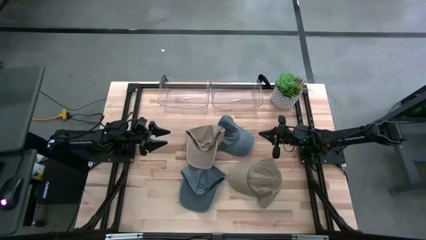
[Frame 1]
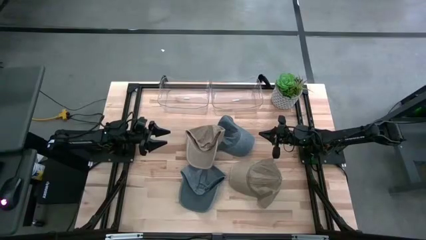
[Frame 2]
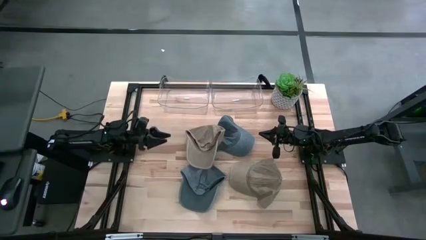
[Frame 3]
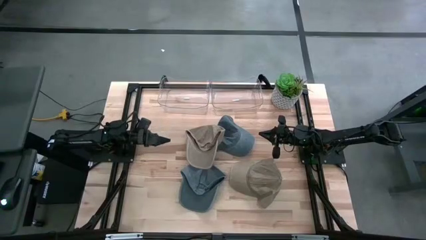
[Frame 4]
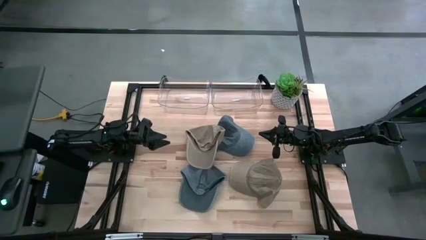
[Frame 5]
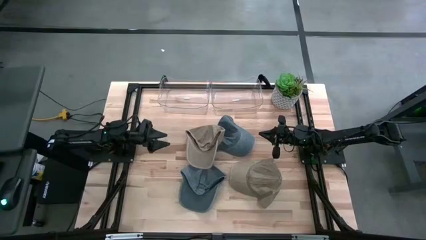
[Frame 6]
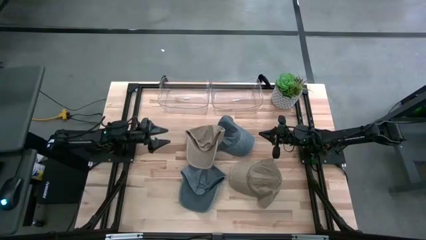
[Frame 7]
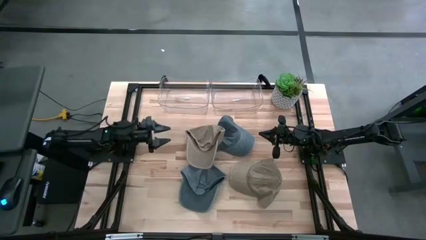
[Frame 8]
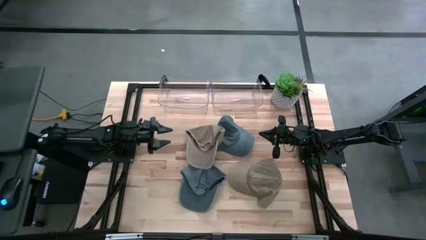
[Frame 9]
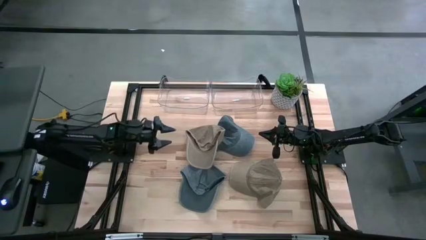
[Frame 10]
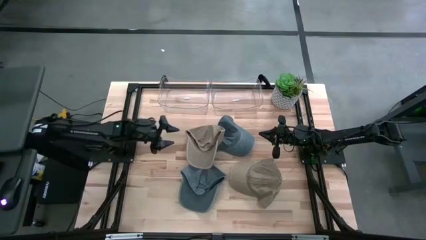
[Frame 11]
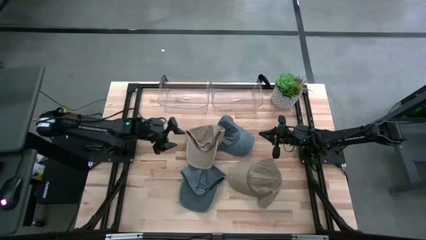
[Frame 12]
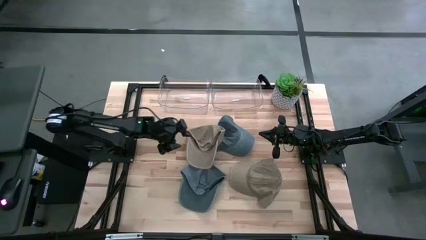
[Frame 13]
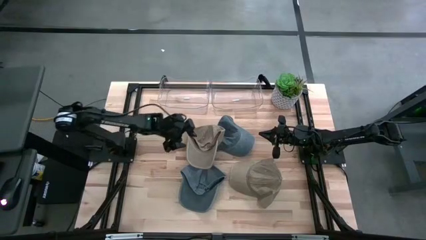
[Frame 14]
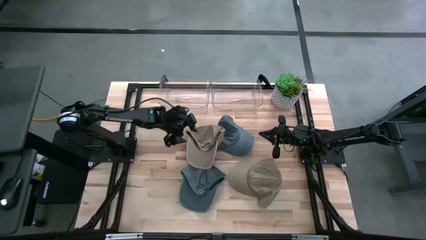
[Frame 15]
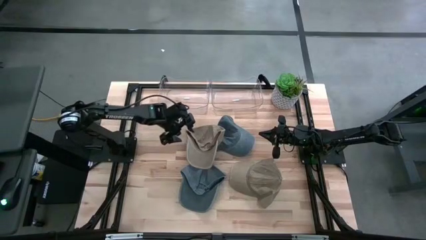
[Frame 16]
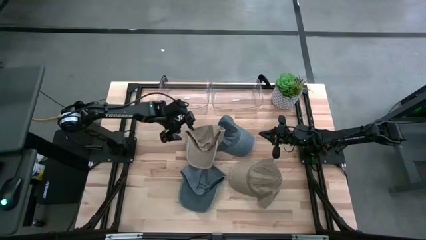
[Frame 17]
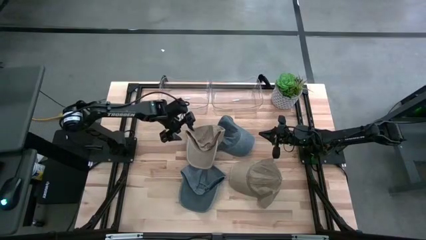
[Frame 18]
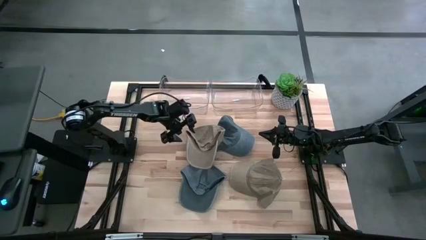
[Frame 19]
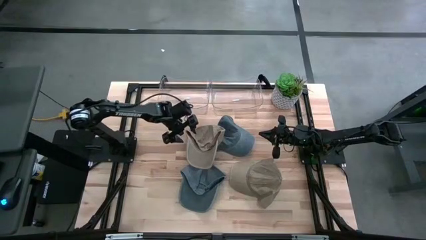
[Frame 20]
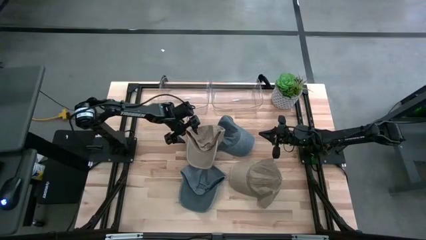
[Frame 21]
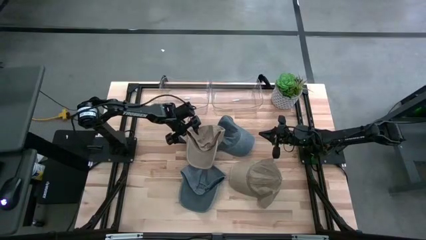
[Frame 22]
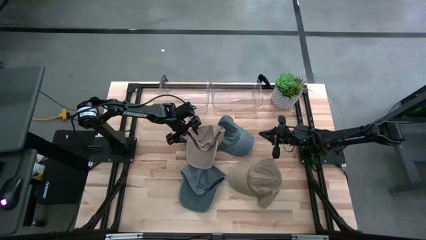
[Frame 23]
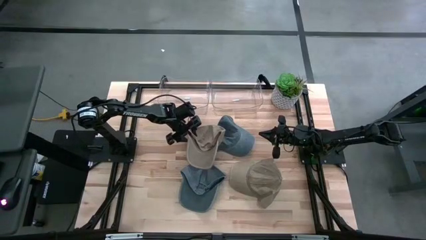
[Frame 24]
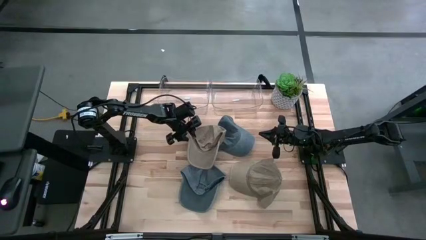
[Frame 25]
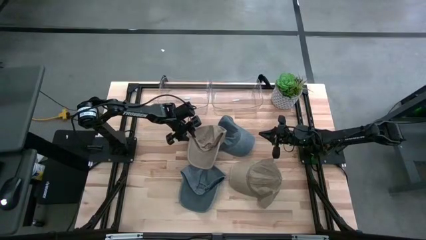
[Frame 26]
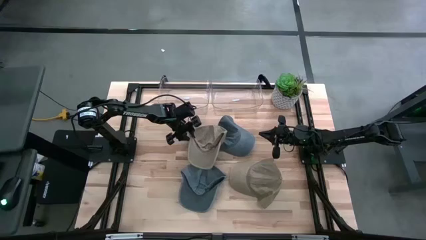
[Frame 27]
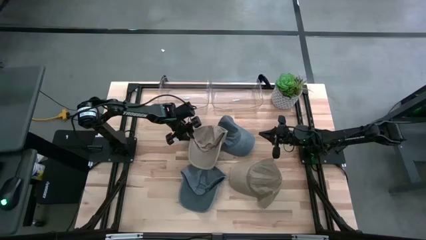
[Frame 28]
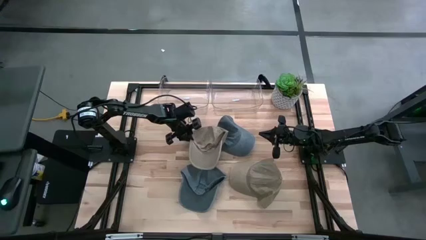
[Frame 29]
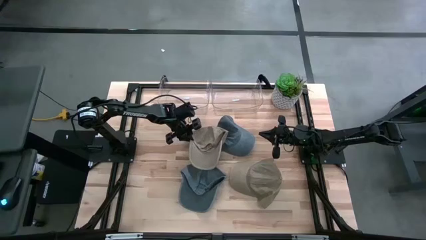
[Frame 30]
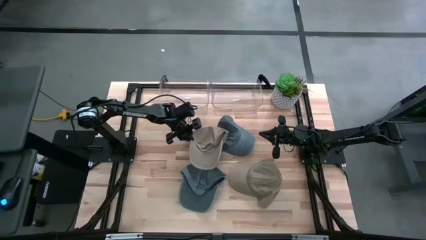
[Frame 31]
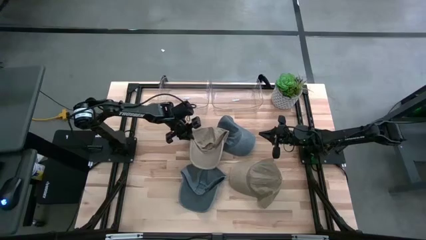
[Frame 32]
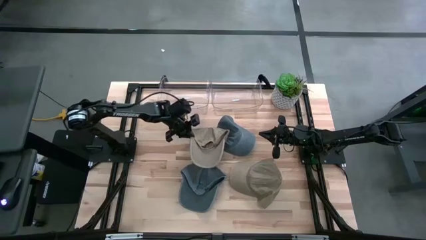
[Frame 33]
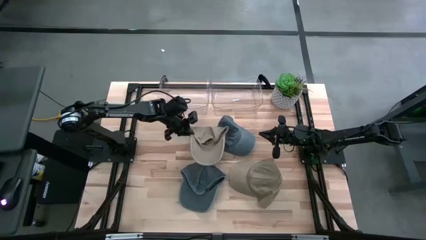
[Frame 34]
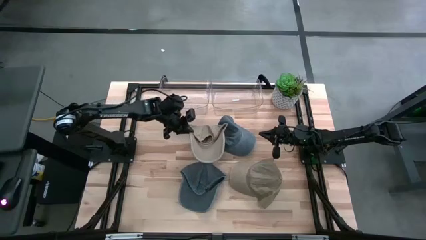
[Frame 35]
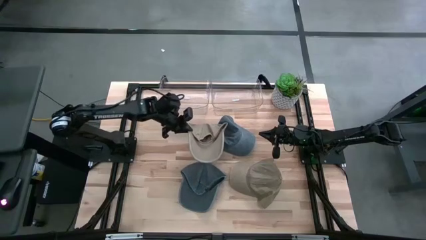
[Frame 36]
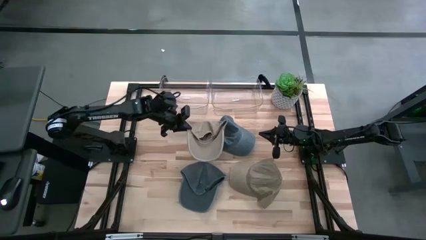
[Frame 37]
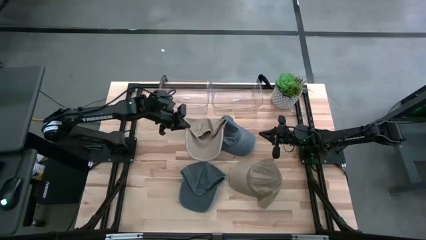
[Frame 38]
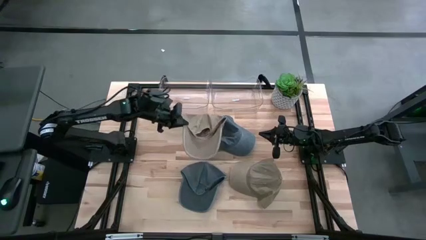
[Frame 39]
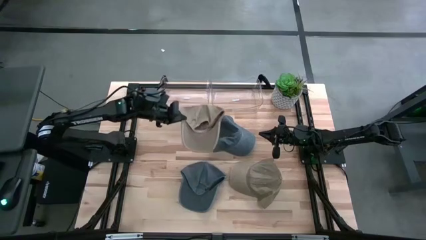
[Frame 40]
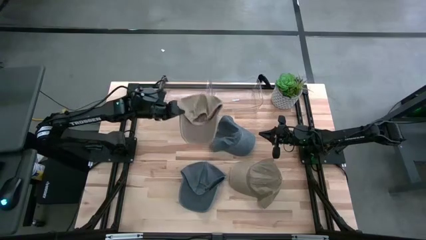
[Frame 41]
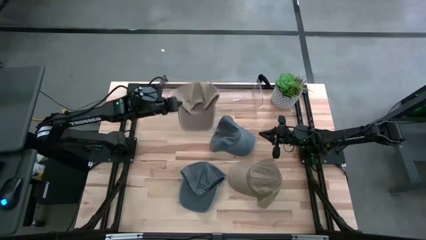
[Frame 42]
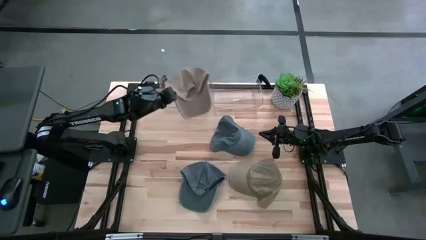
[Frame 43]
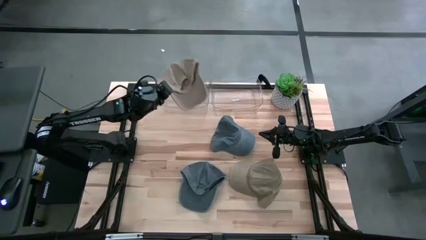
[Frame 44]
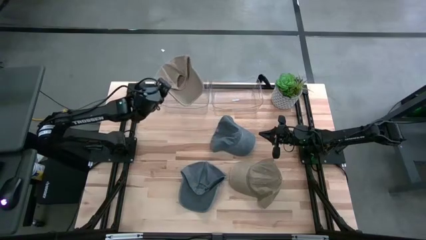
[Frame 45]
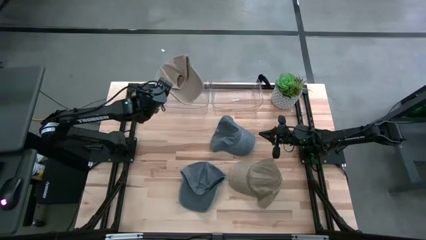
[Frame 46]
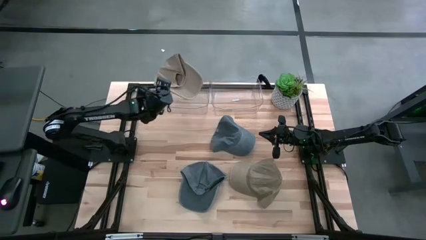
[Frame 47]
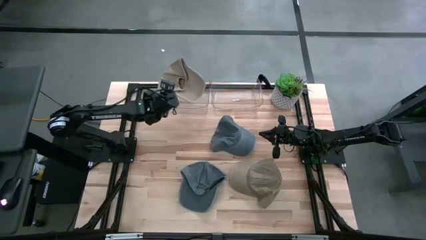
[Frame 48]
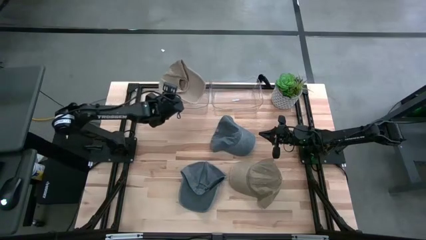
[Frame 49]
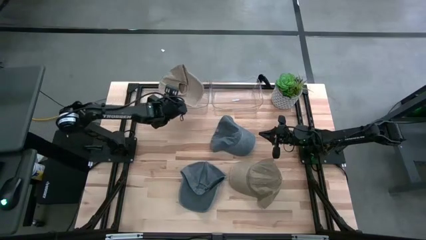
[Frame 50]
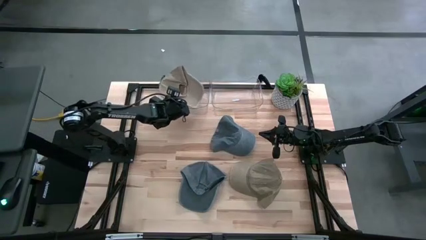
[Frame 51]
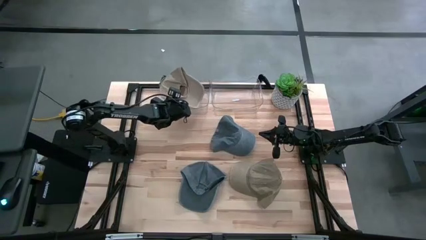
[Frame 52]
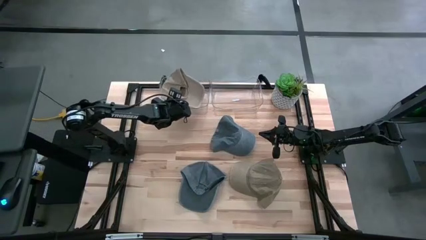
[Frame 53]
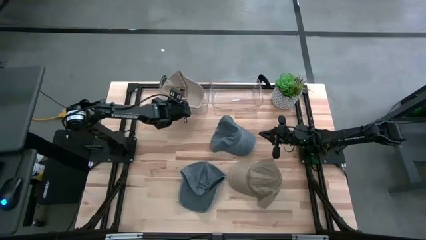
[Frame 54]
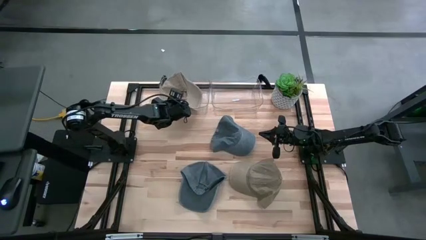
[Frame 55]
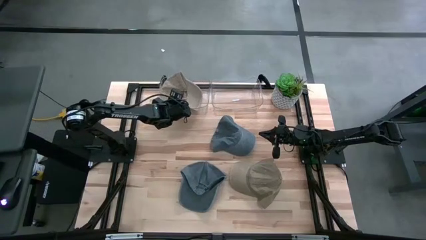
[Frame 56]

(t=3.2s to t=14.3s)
Task: Pick & Place hat
Put the top brown cap into the left transparent bin

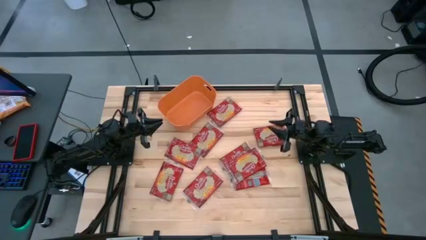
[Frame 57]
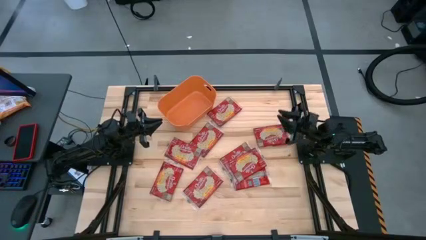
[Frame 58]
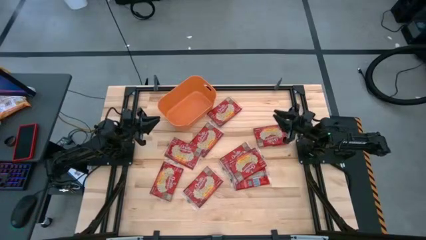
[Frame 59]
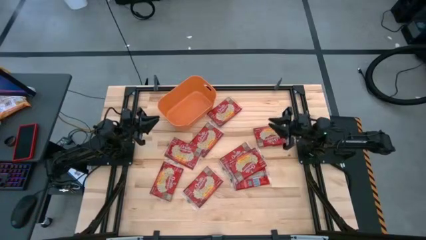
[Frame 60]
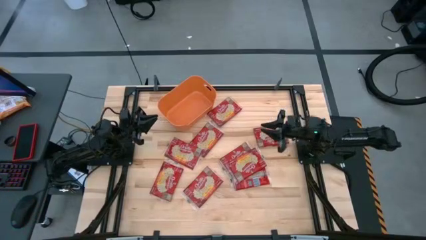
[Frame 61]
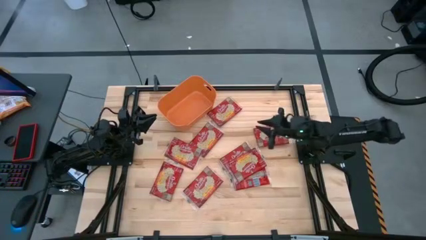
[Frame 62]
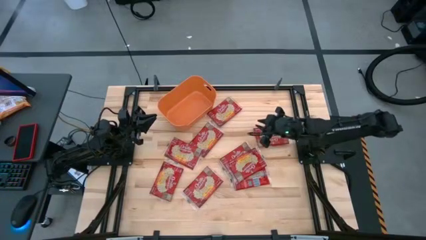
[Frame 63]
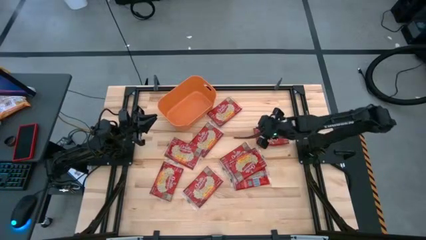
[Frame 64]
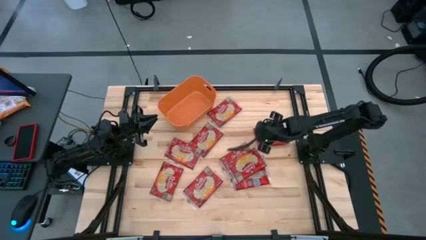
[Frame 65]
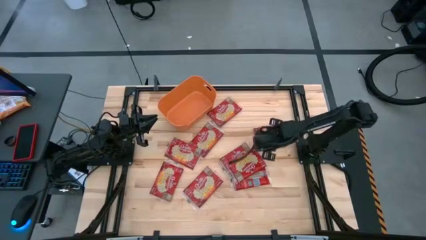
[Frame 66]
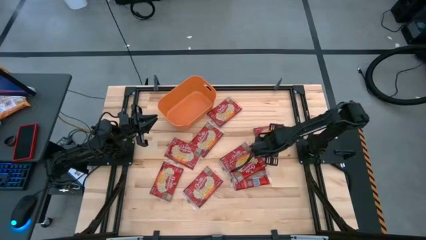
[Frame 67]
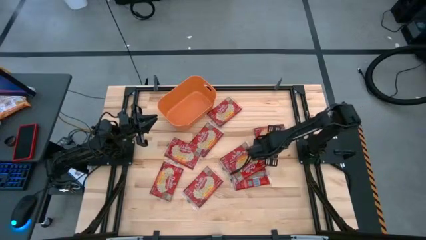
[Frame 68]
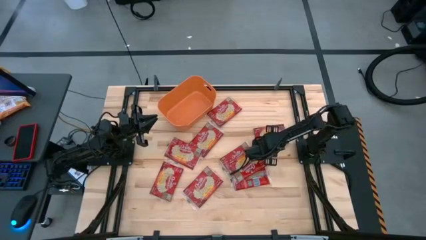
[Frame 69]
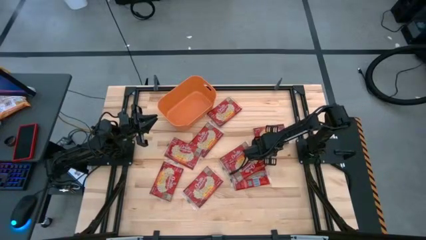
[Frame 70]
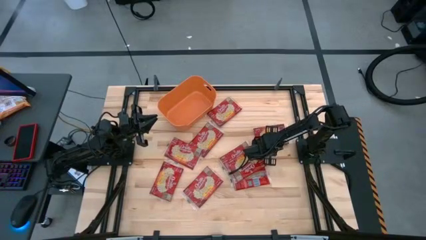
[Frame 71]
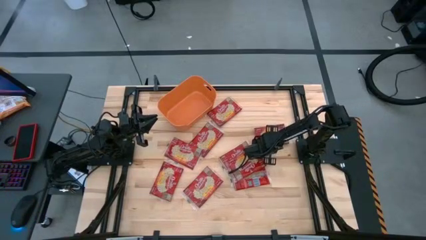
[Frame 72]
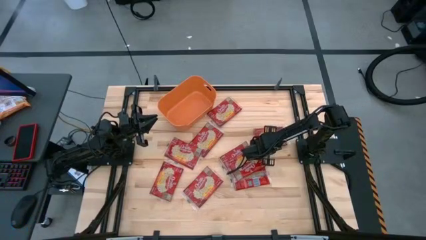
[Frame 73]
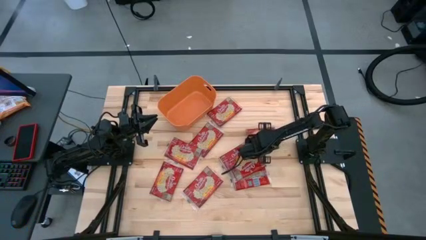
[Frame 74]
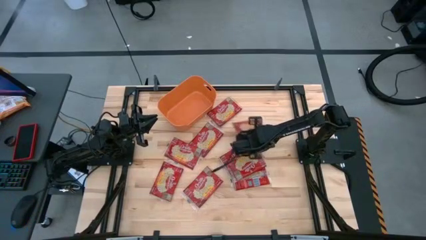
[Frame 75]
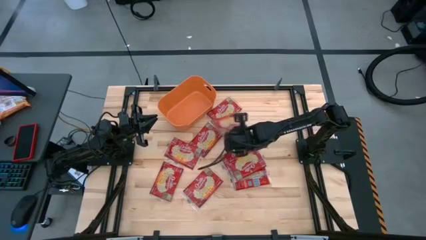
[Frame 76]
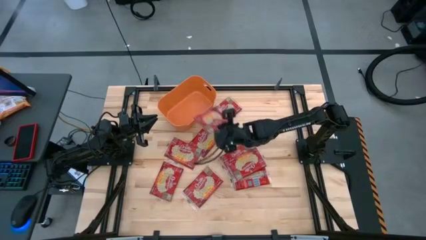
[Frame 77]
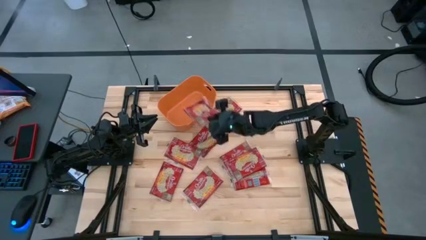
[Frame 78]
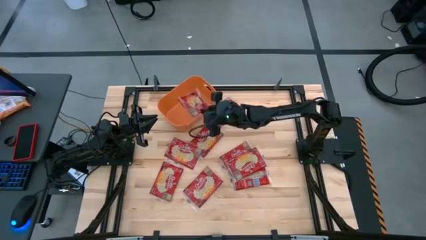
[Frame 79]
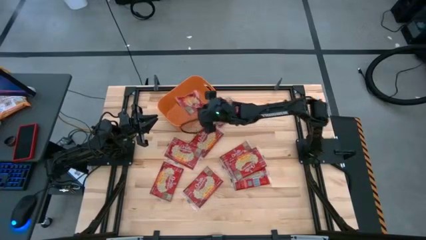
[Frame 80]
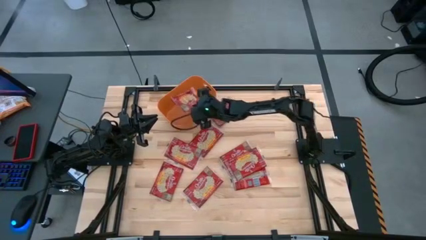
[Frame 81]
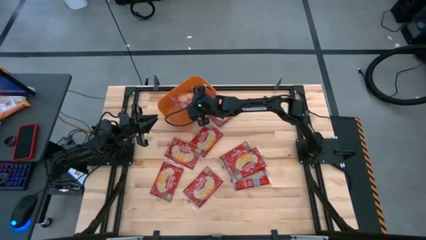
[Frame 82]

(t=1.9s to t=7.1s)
Task: Sort popcorn bags into baskets
Put the red popcorn bag into the orange bin
